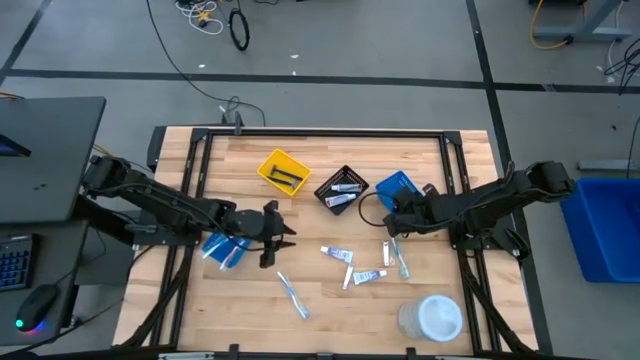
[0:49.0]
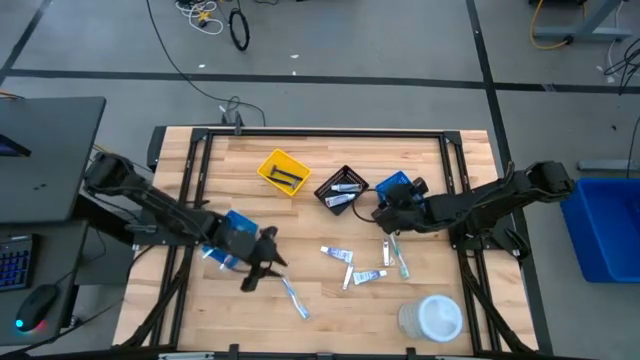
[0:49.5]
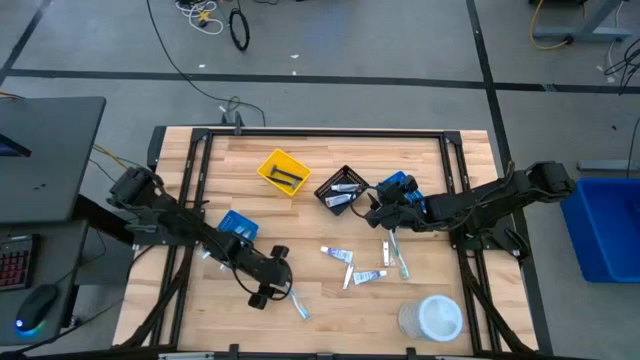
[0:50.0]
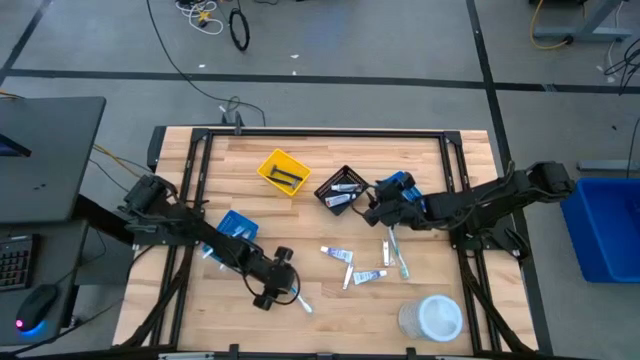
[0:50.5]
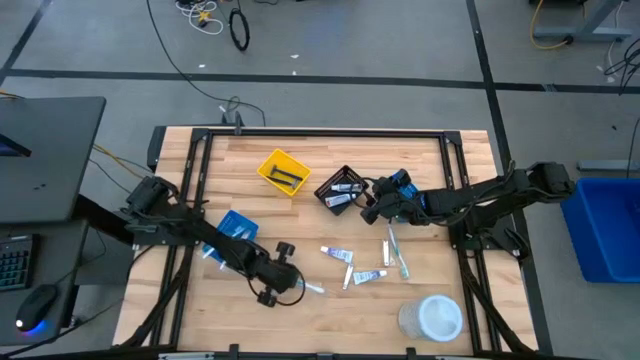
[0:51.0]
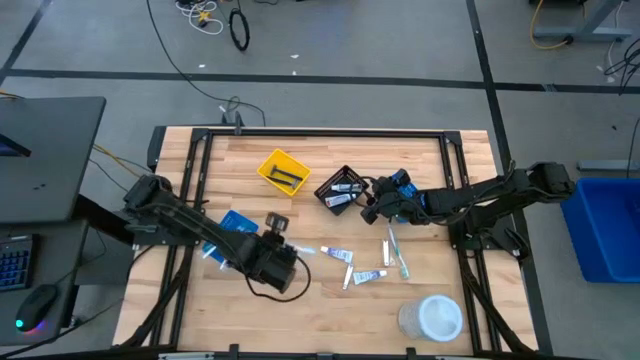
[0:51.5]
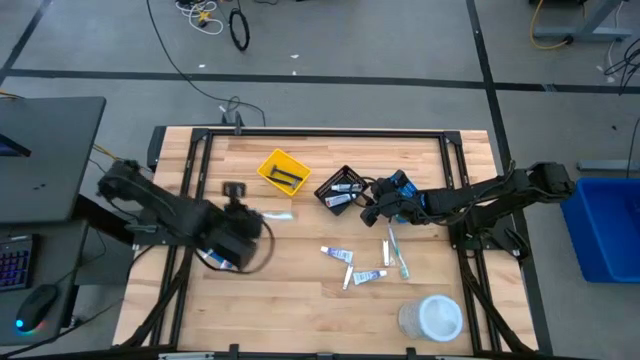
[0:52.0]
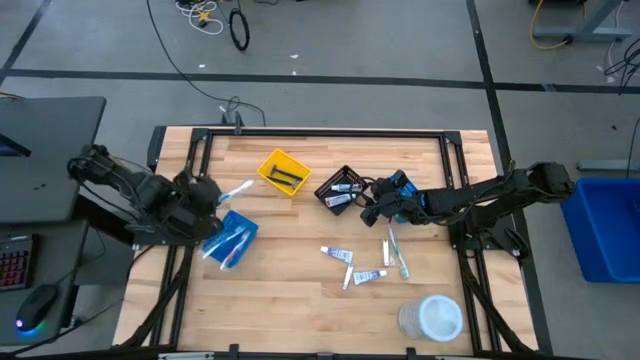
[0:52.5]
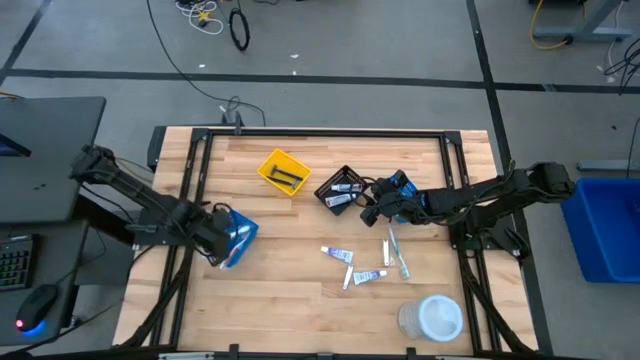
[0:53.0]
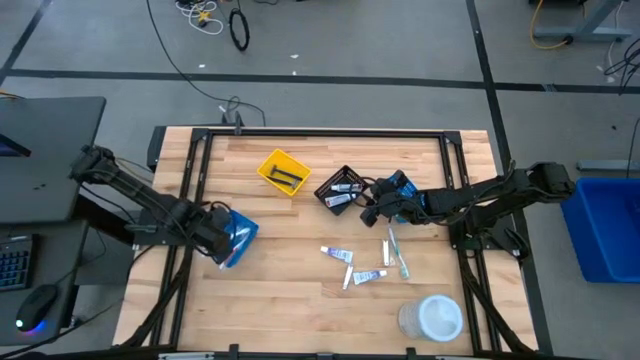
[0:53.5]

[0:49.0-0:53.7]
Task: Pick & Place Travel size toiletries
Put the blue toothbrush into the left blue bin

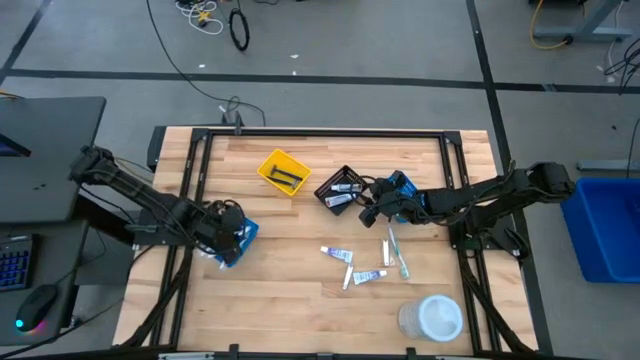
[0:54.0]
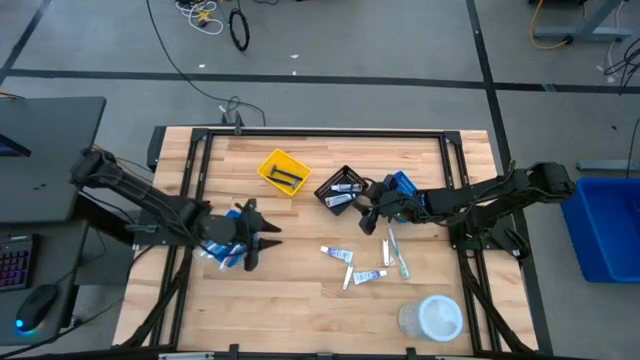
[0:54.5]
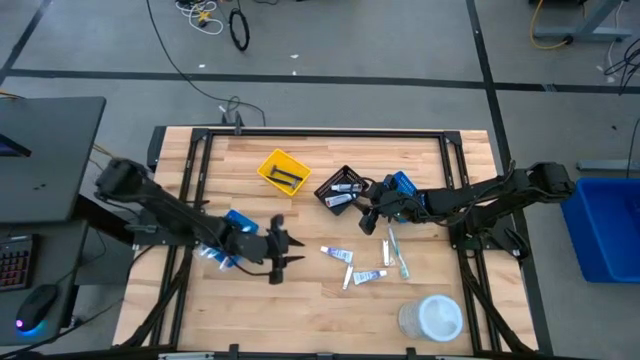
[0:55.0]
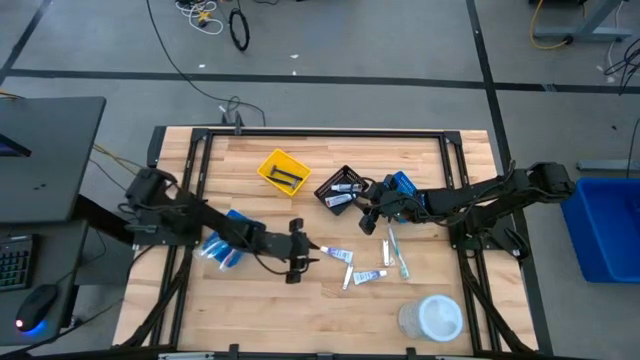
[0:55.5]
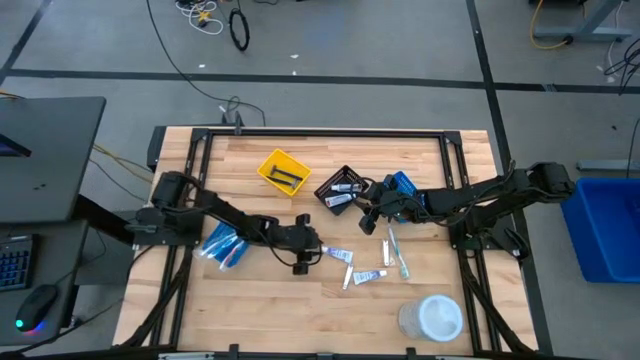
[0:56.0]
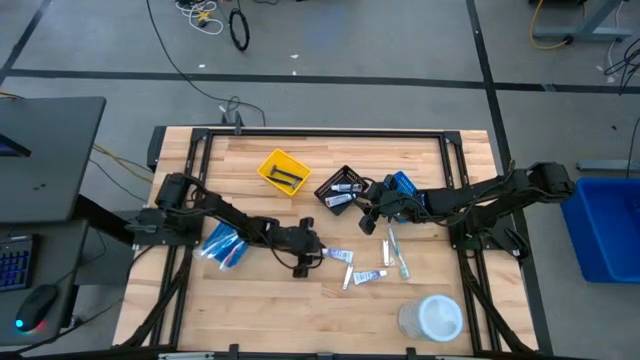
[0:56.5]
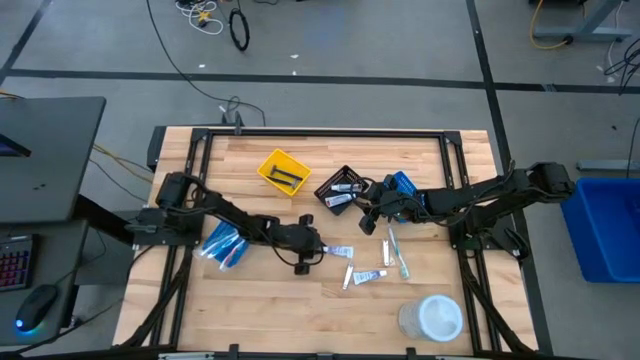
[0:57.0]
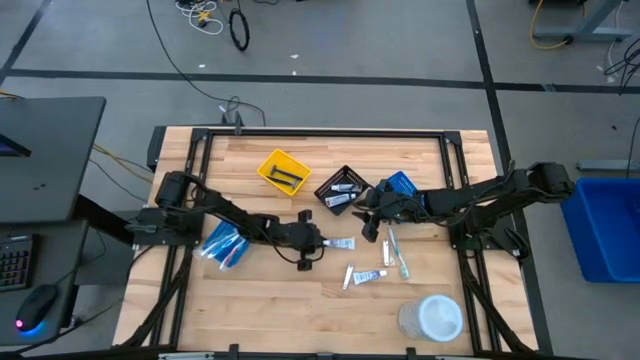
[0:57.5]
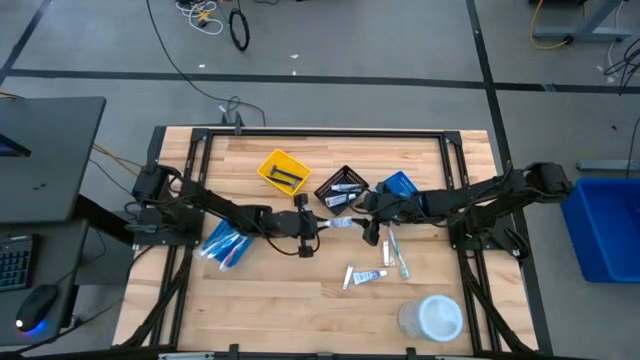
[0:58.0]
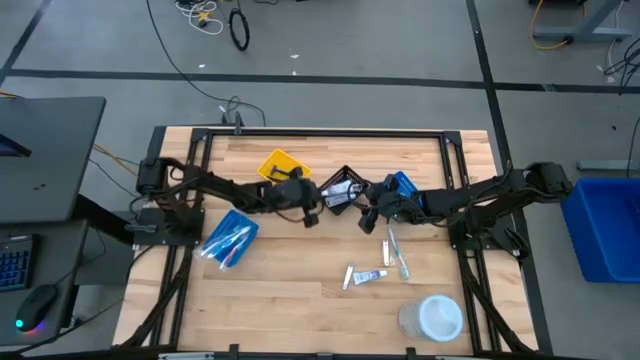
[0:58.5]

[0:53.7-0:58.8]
Put the white toothpaste into the black bin

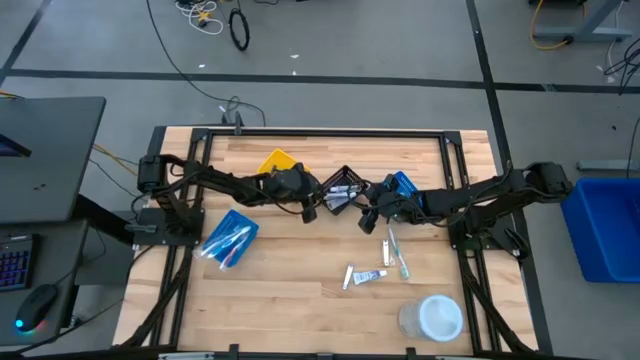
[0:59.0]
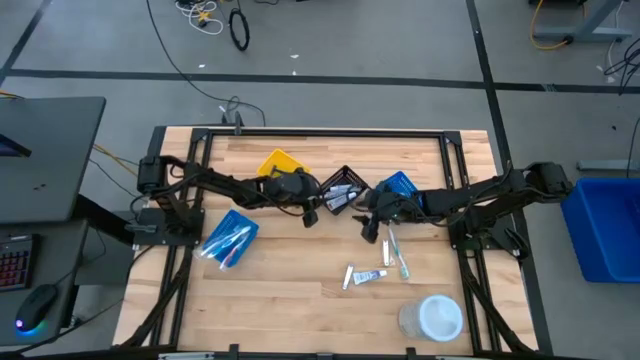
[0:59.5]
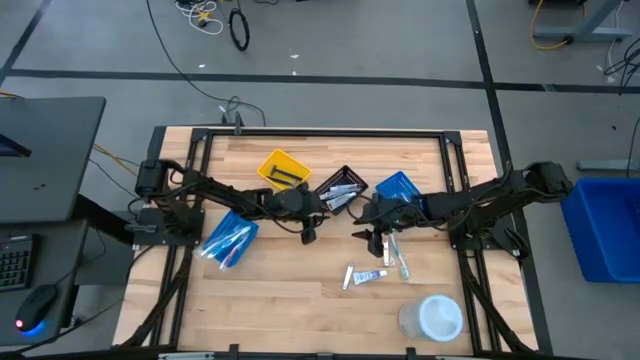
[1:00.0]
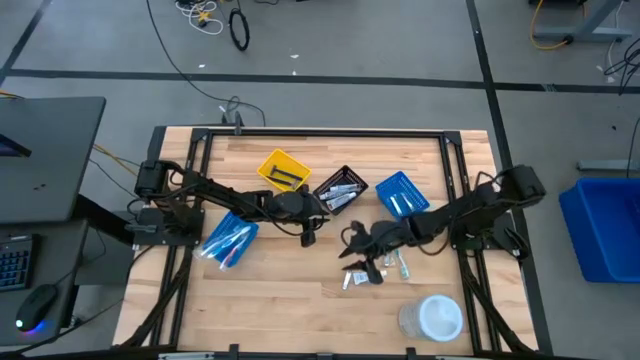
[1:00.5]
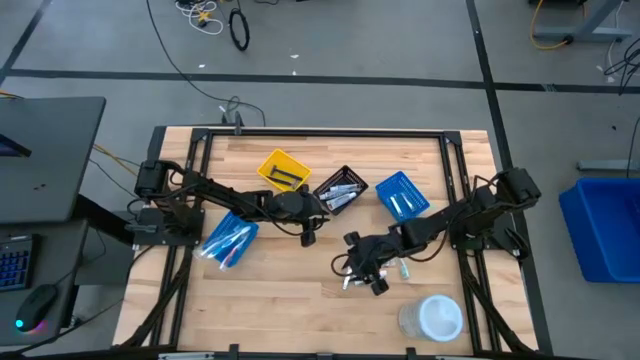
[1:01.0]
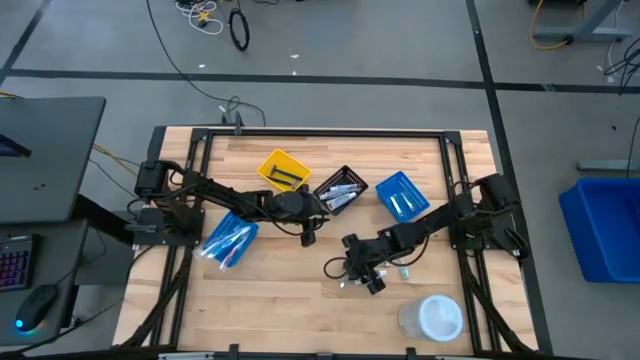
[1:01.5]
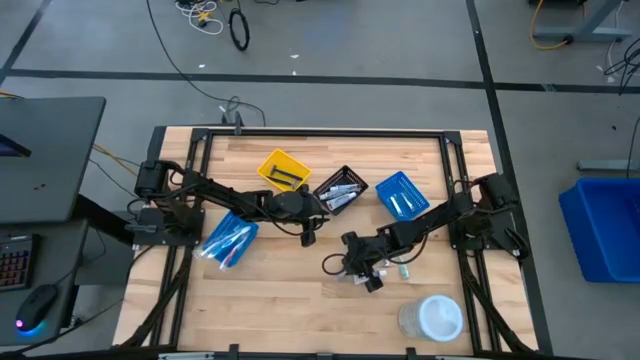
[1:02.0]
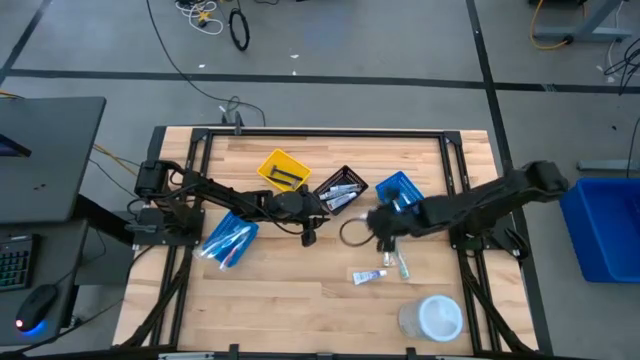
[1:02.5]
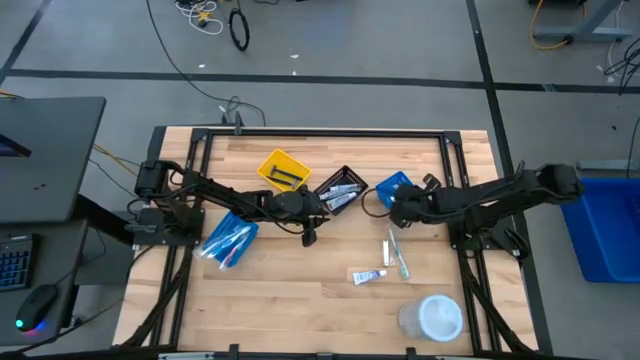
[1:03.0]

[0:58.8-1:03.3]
Put the silver nail cutter into the right blue bin

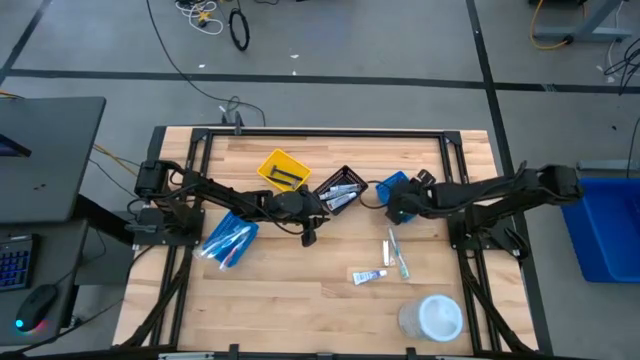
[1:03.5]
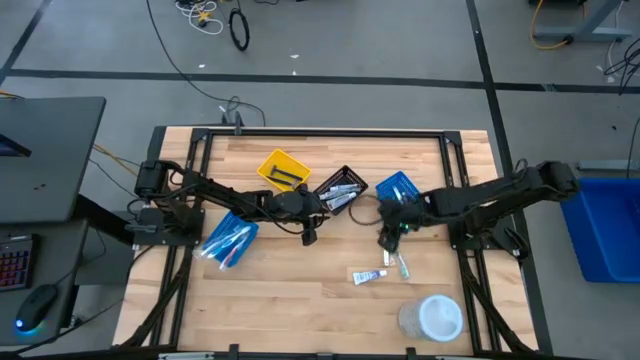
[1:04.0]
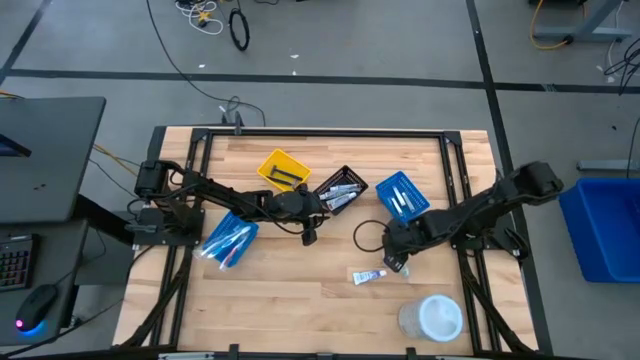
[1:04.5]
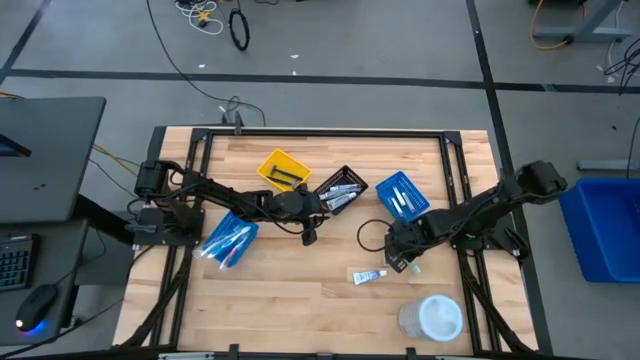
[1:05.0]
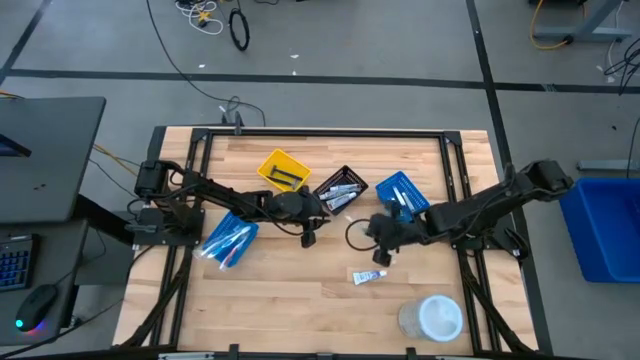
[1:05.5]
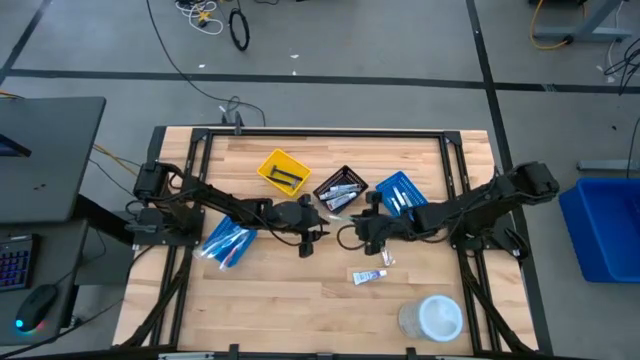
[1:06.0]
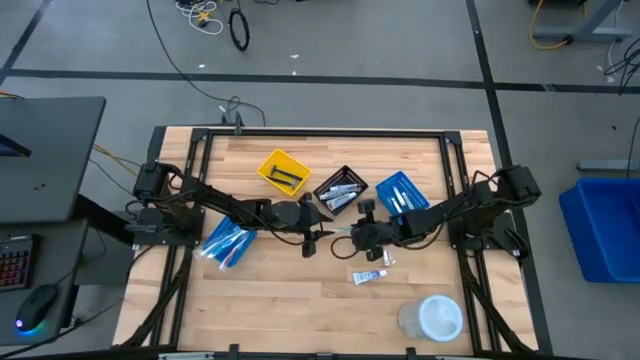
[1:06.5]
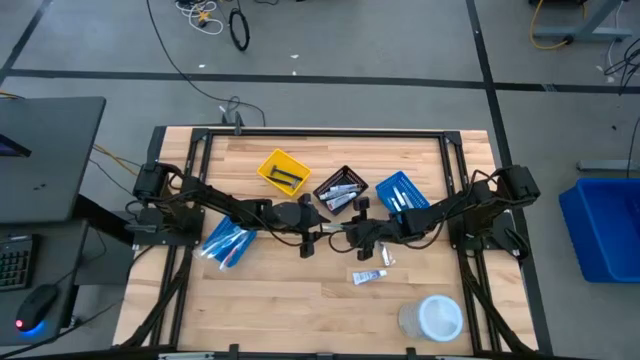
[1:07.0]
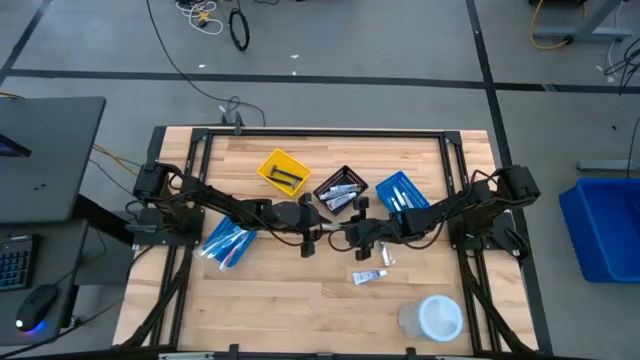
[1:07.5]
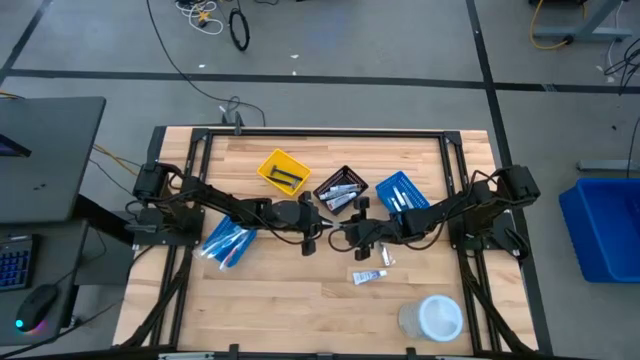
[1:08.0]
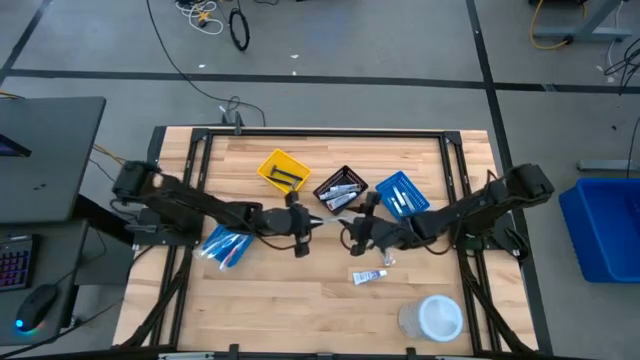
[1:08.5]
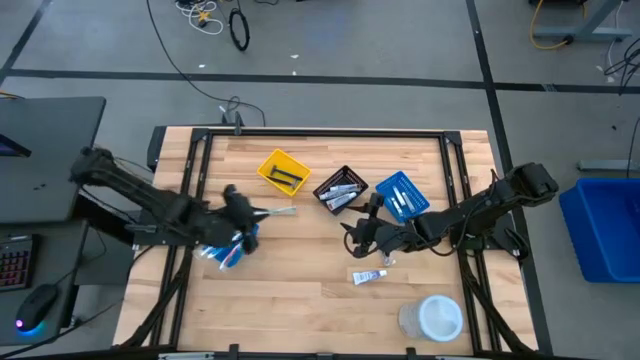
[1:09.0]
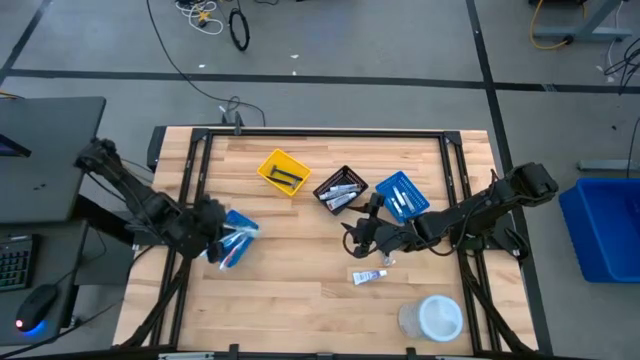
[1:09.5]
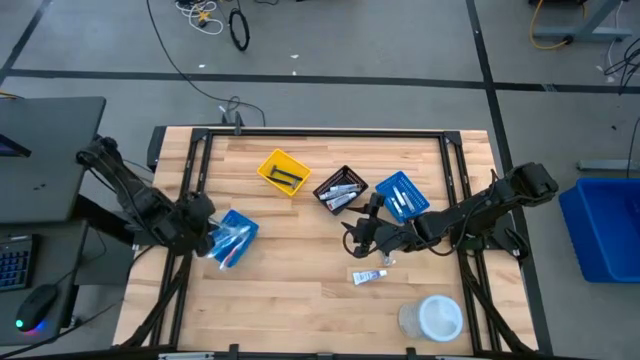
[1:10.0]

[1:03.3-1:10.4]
Put the green toothbrush into the left blue bin
